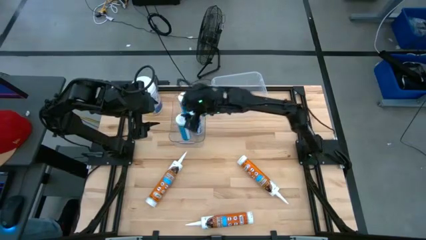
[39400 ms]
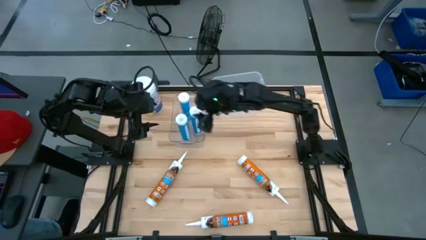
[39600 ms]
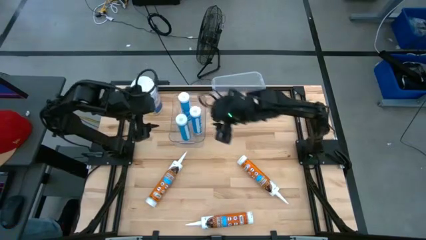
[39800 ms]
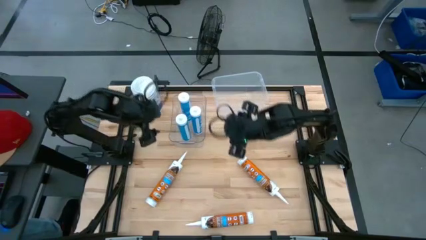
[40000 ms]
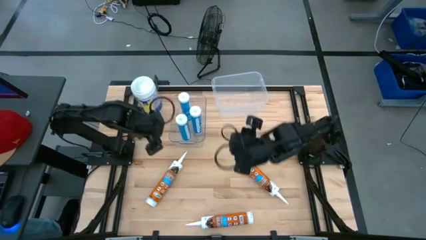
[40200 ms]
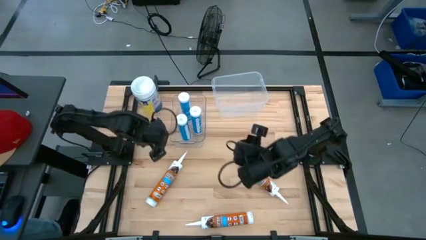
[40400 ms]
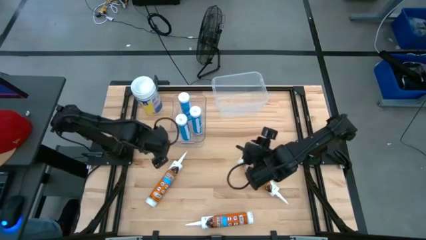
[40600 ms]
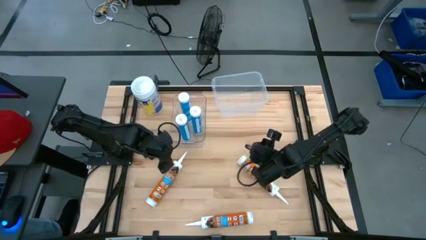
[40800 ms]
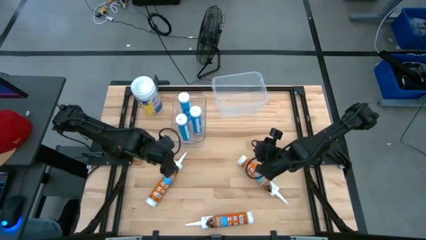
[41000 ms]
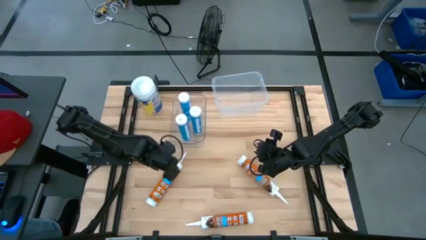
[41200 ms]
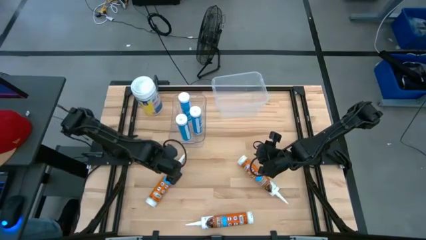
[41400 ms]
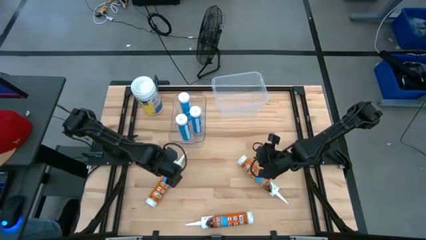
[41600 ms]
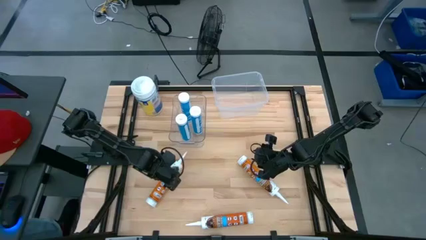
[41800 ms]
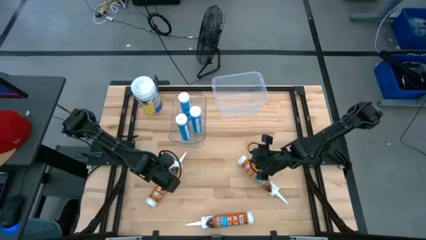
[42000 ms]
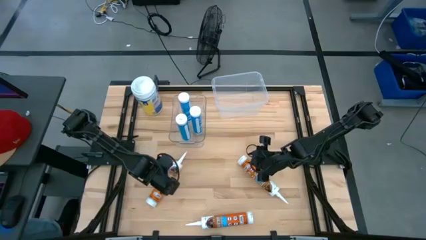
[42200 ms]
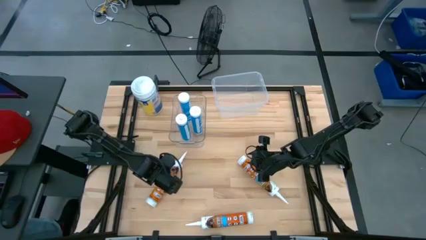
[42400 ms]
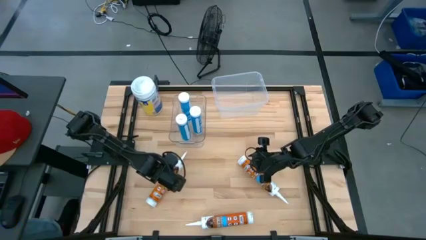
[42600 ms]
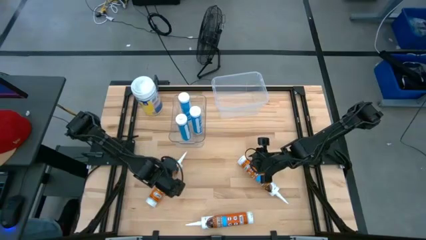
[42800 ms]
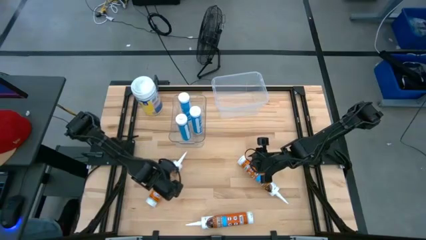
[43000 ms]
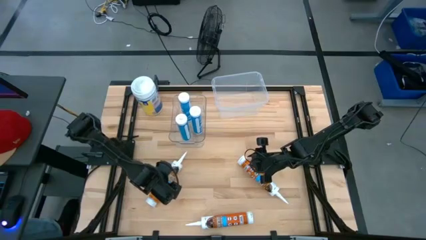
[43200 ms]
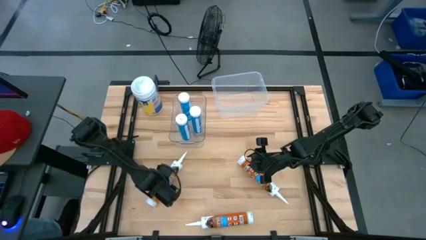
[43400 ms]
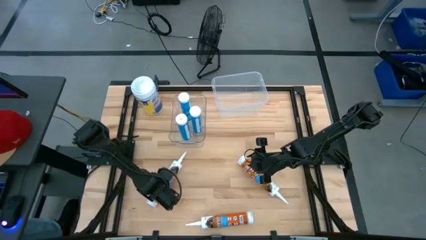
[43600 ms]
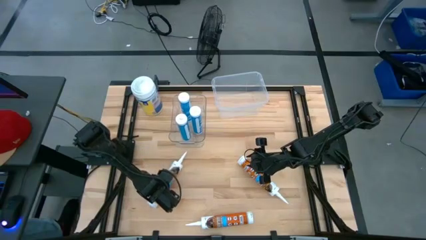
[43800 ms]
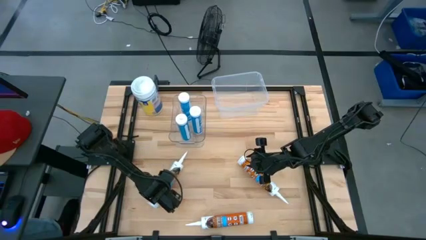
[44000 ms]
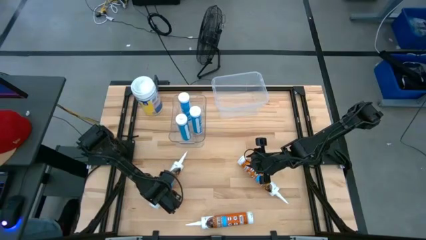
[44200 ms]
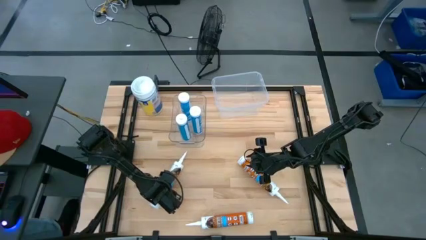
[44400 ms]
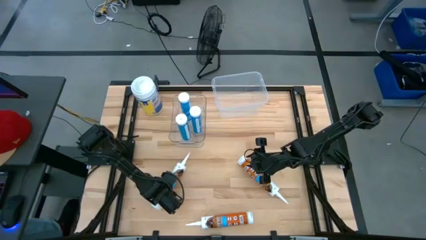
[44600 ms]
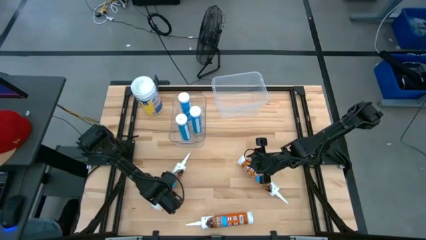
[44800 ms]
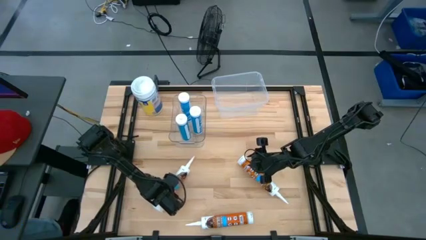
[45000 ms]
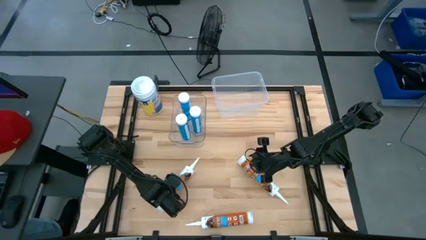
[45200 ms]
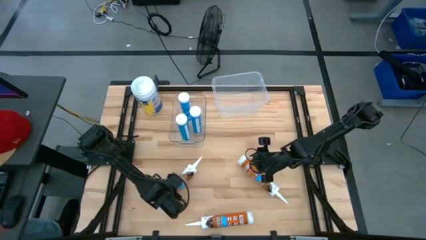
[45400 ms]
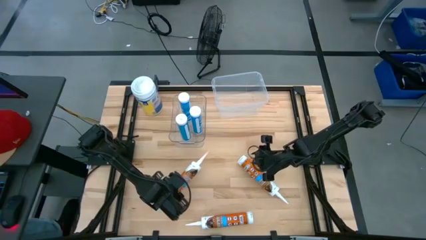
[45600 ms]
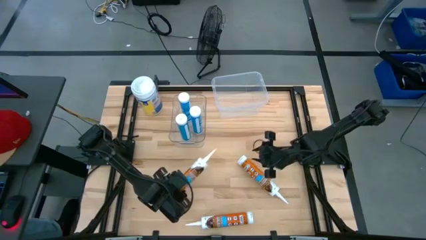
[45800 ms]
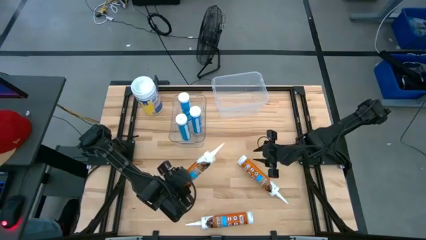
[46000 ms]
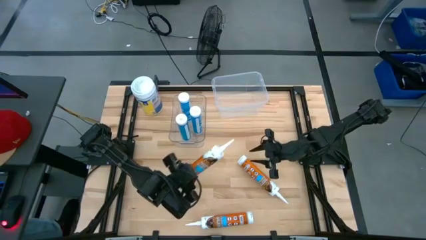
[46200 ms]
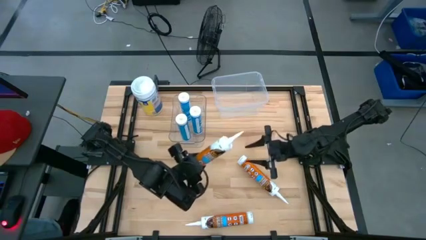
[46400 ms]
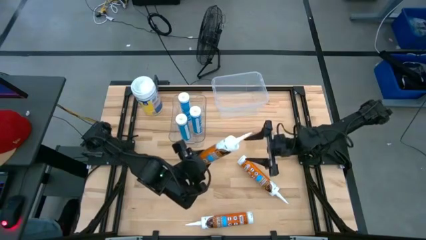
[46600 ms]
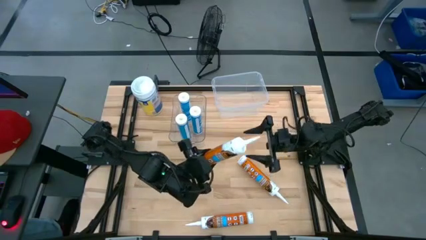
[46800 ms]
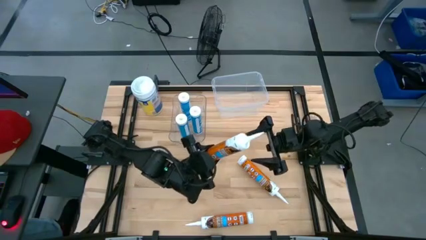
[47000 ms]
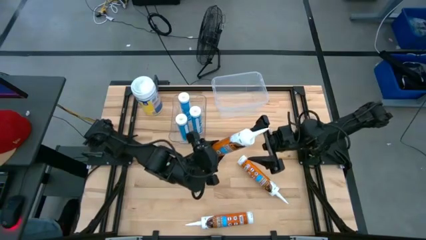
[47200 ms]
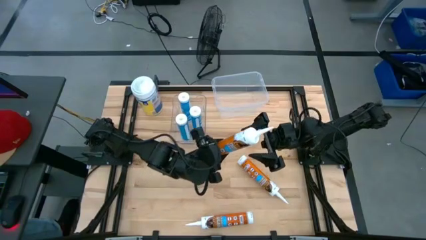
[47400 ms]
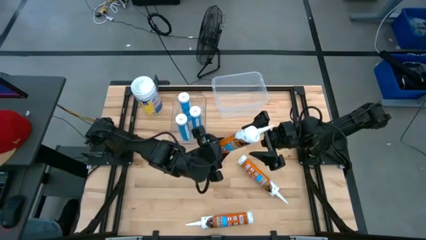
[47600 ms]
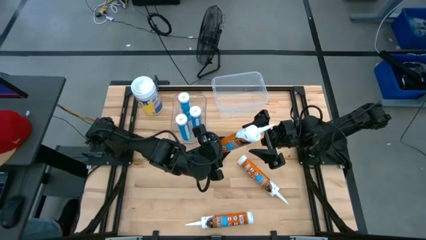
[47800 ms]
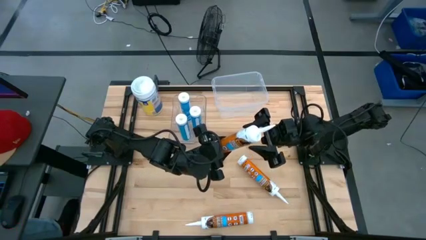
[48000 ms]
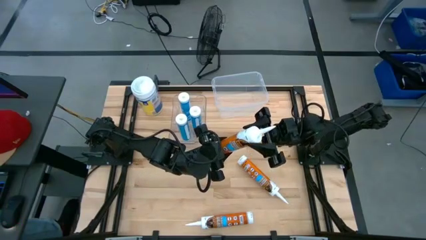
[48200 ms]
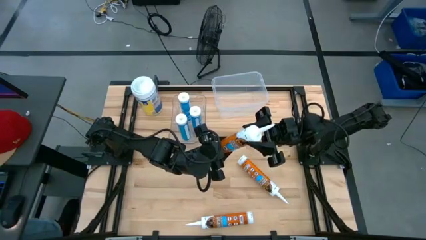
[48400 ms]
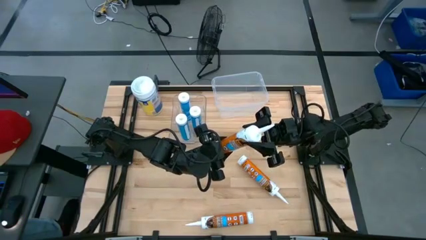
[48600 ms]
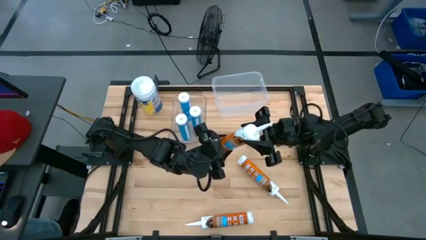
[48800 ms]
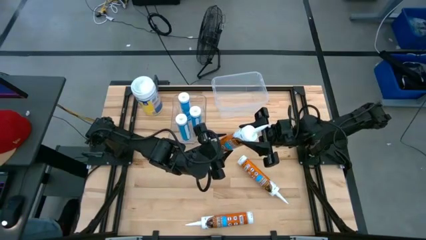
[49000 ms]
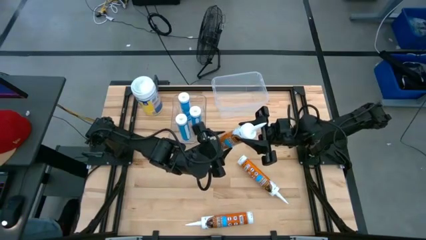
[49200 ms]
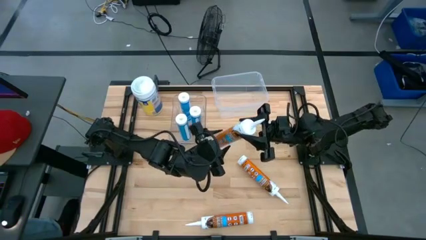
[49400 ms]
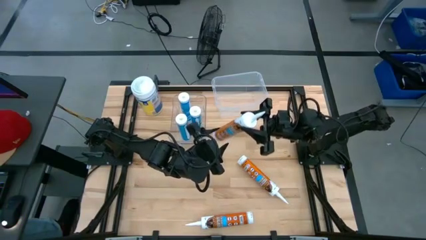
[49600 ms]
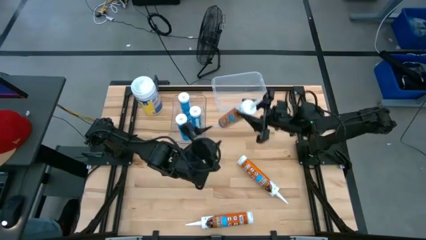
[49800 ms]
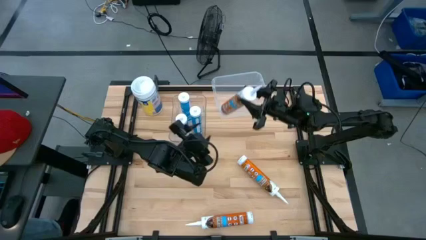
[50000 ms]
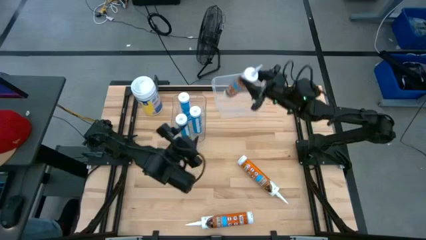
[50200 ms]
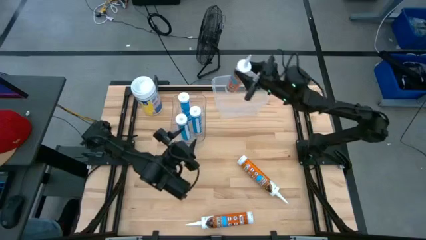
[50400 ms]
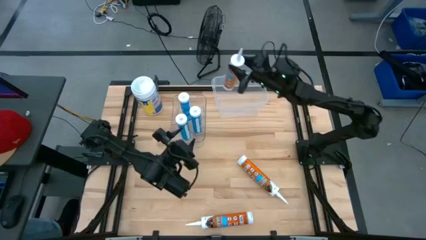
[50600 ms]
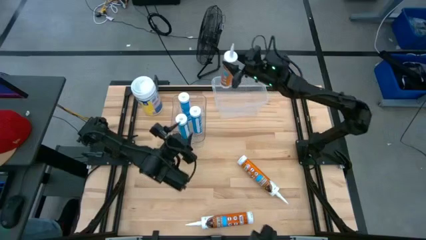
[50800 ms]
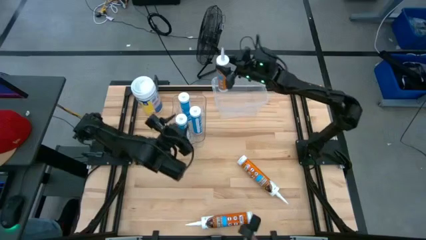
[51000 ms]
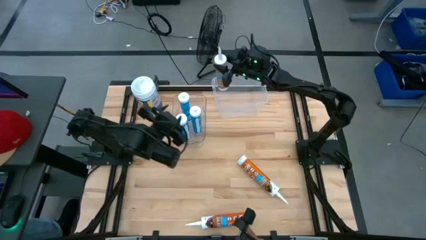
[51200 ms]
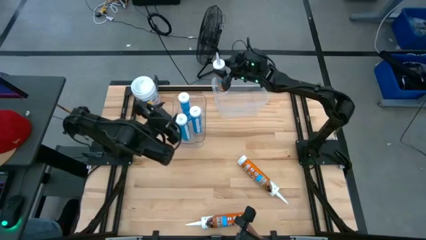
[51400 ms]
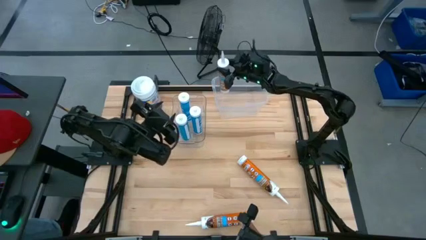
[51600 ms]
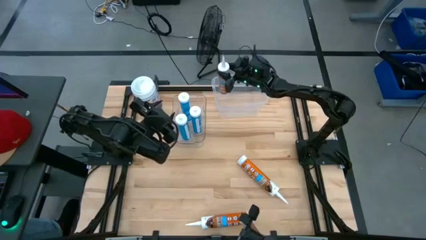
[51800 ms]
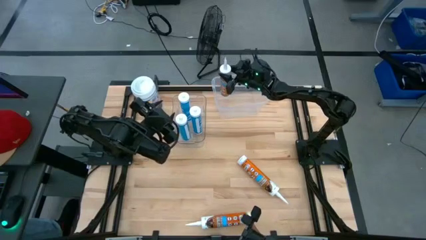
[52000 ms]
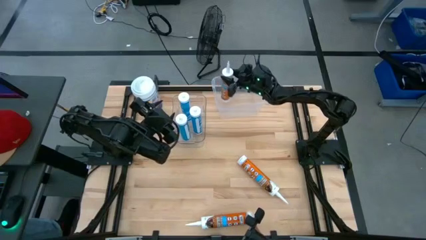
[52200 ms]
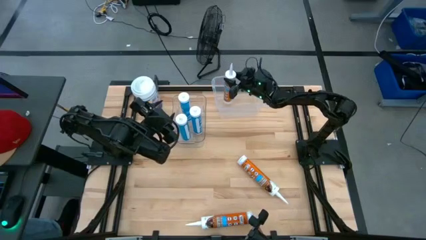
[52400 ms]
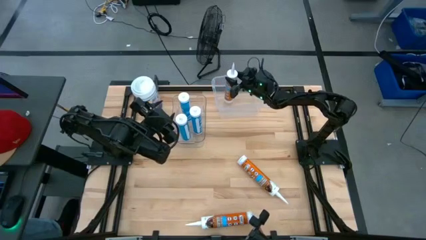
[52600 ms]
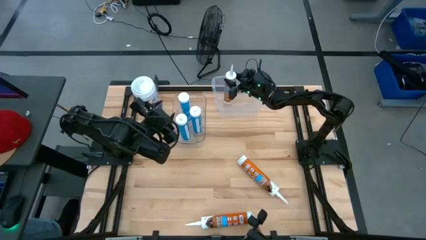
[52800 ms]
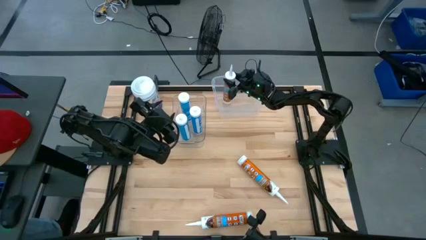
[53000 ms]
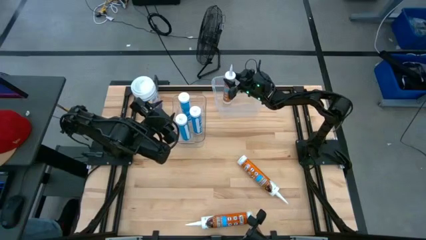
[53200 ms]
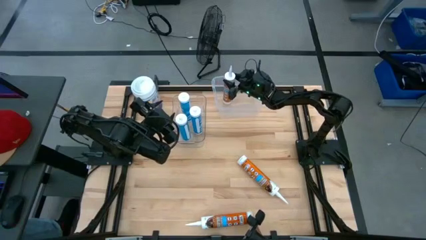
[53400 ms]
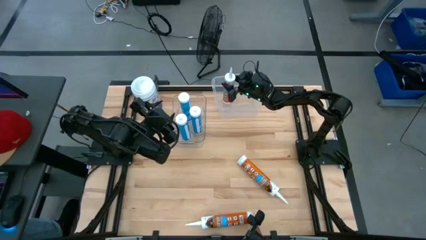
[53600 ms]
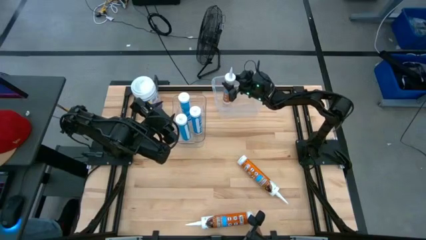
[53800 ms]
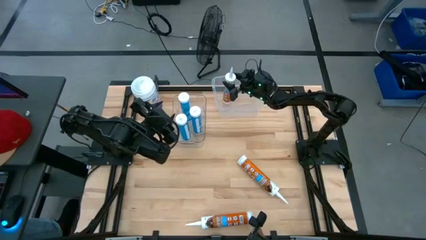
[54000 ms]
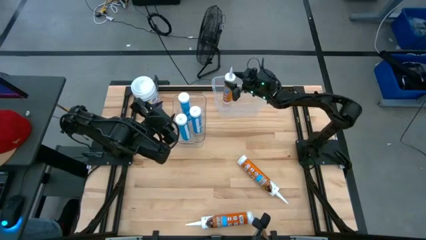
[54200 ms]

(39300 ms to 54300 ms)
Task: Pick & place silicon tubes, Sealant and Lysol wipes
Put the top left orange sealant into the white bin

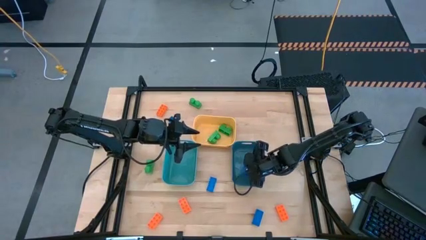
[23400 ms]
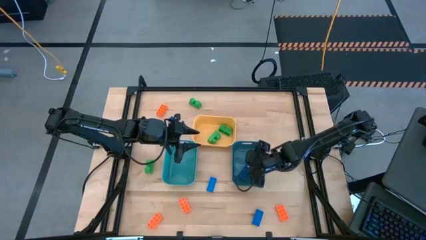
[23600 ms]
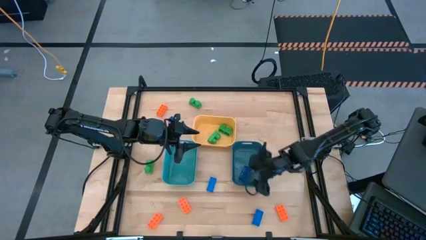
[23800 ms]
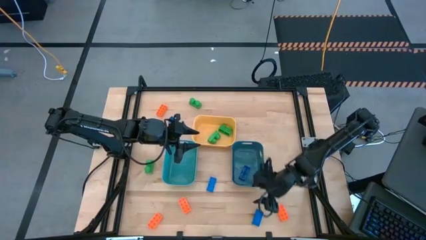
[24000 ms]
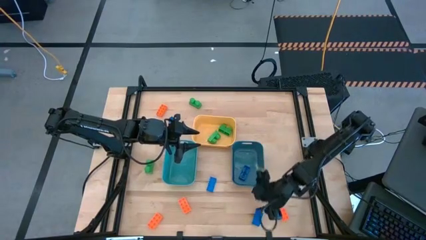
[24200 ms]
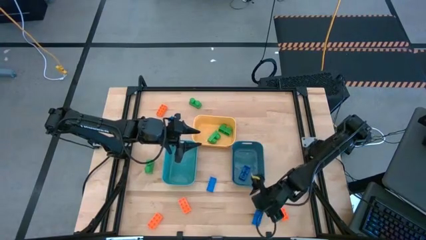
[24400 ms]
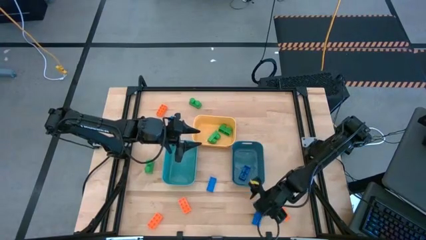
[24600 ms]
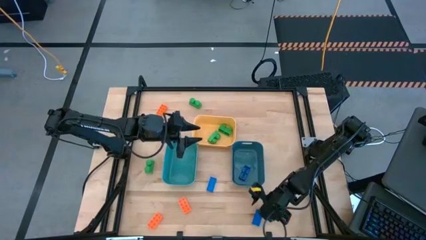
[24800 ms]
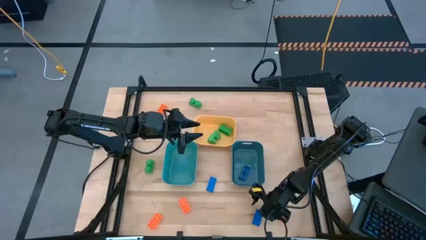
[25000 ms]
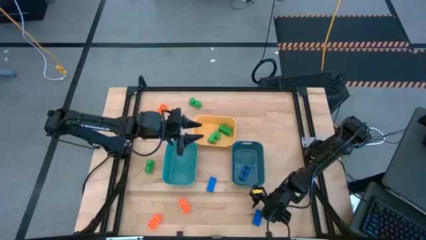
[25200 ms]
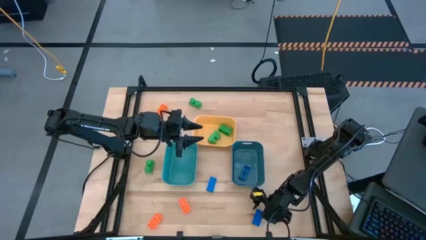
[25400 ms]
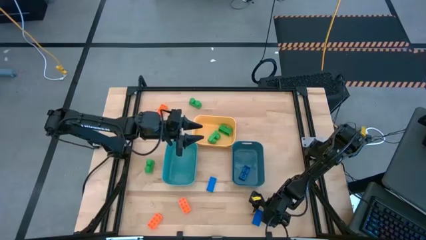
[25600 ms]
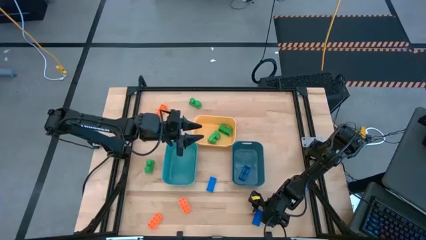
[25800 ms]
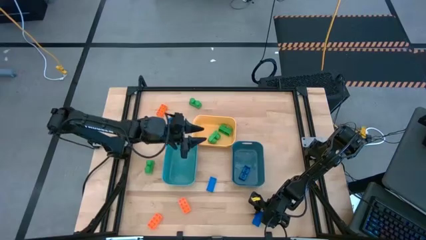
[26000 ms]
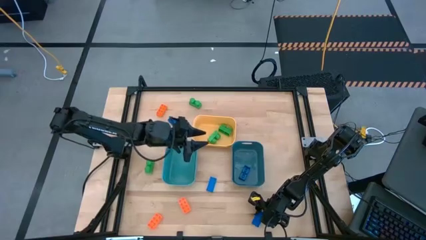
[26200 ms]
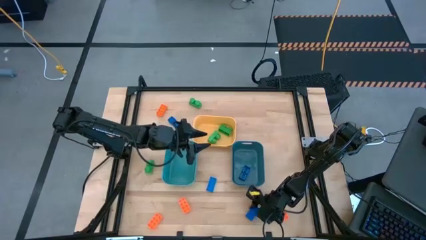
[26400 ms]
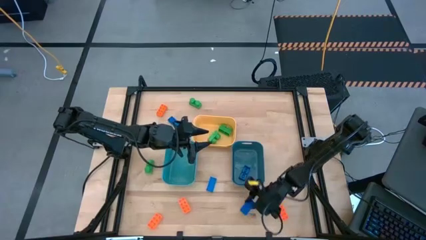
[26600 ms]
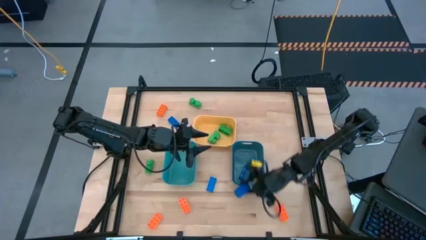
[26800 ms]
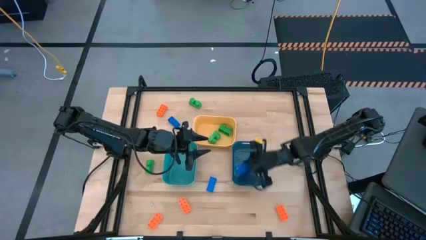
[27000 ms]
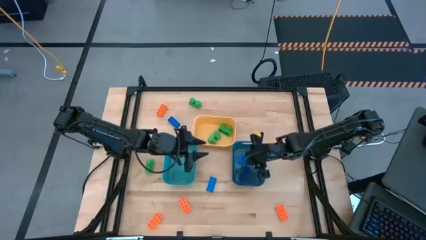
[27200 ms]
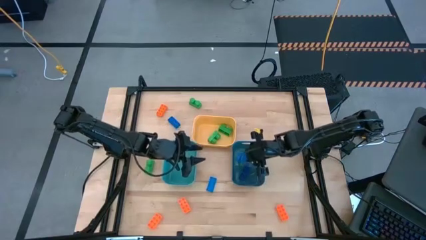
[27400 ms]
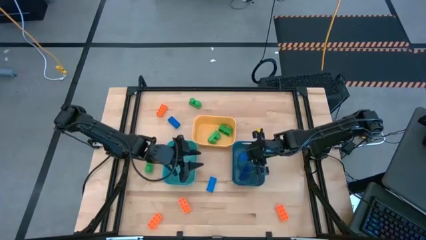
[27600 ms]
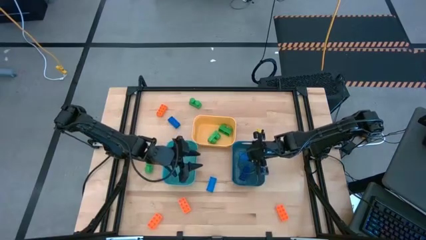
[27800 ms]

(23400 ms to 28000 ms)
Task: Sort & place blocks by color
Put the blue game piece into the blue bin
